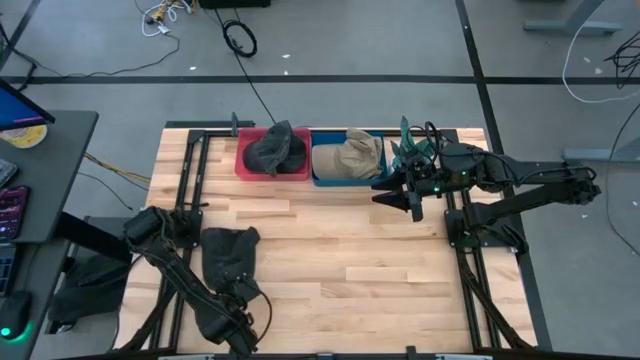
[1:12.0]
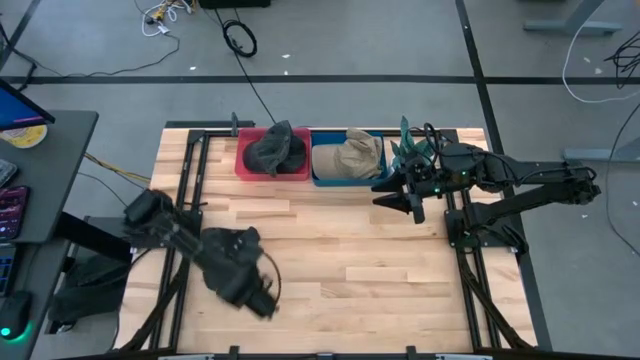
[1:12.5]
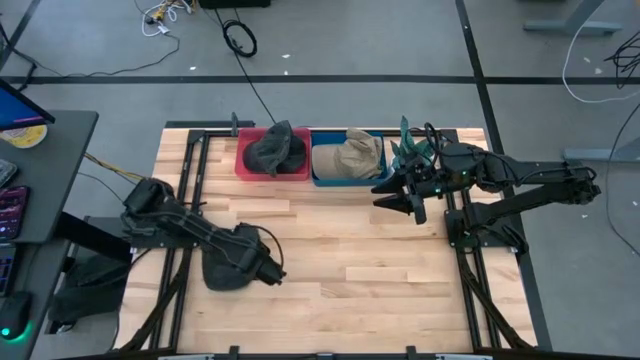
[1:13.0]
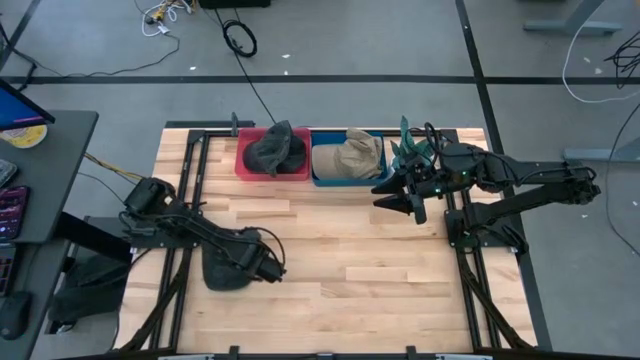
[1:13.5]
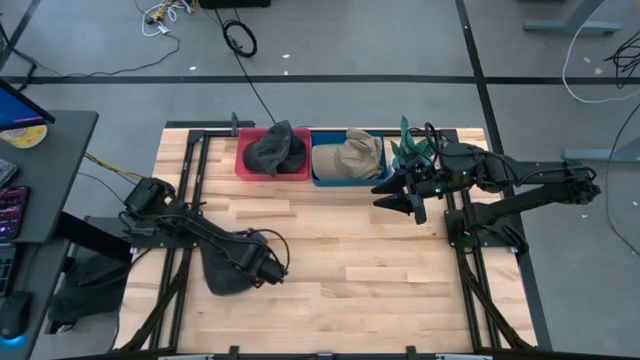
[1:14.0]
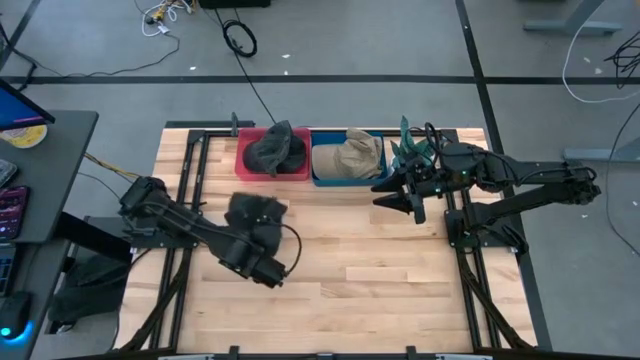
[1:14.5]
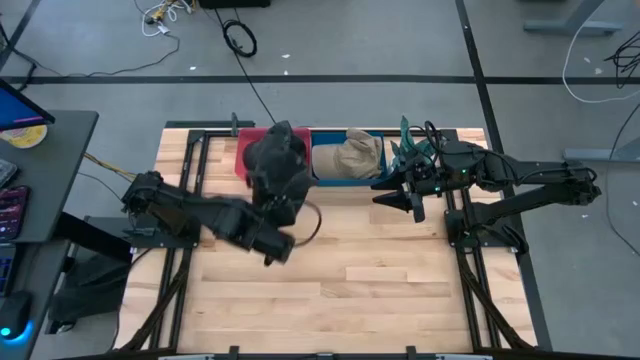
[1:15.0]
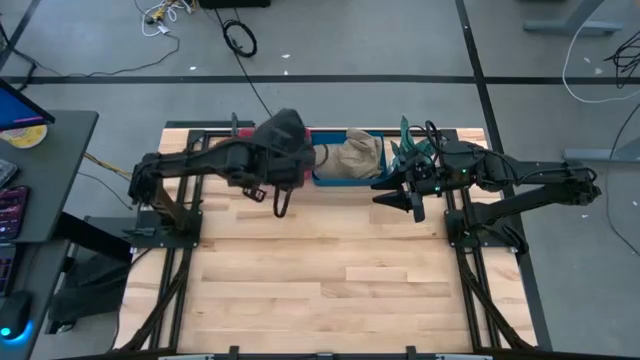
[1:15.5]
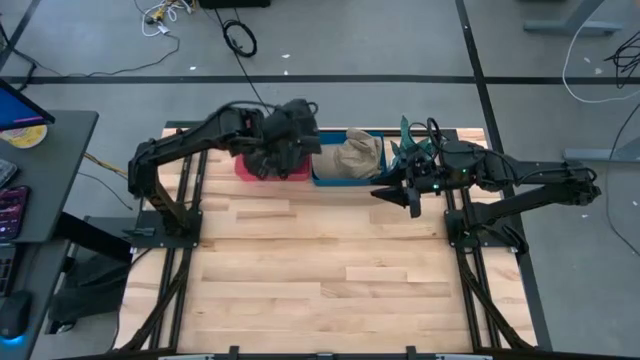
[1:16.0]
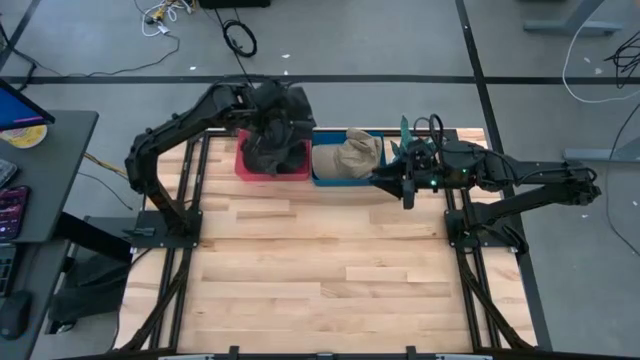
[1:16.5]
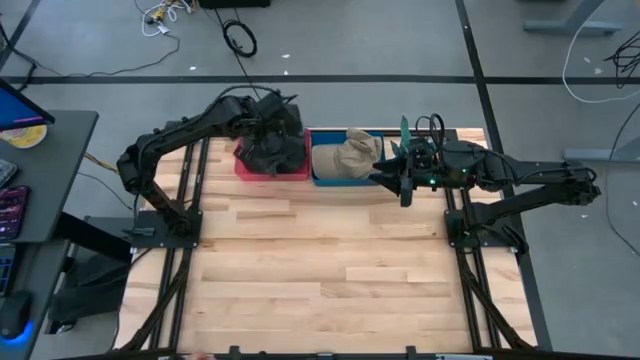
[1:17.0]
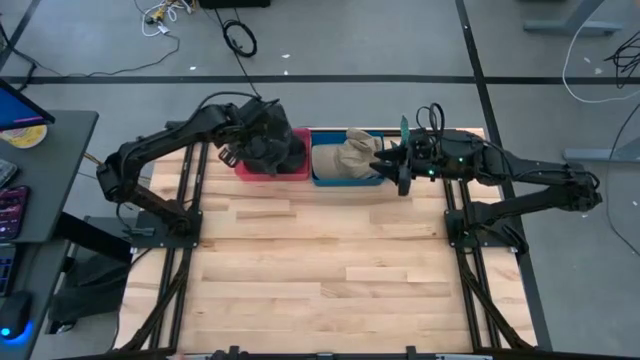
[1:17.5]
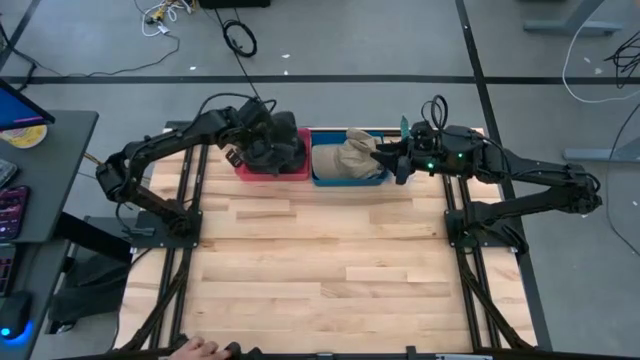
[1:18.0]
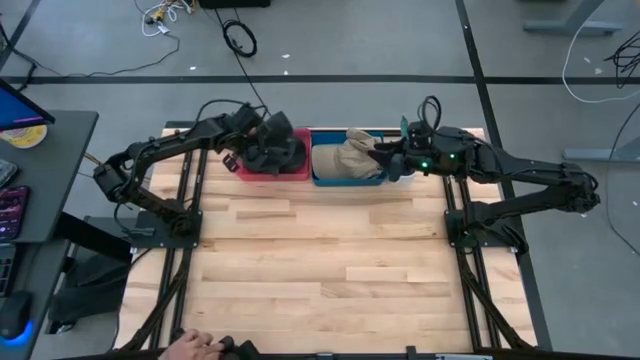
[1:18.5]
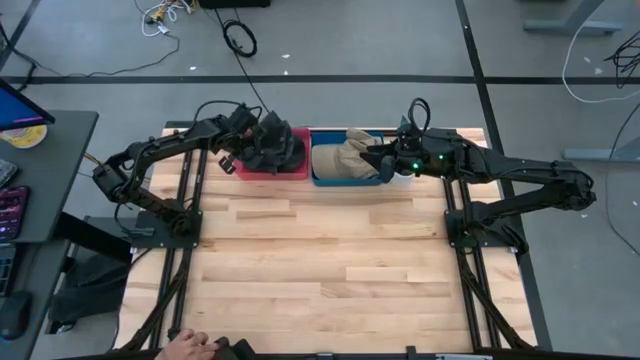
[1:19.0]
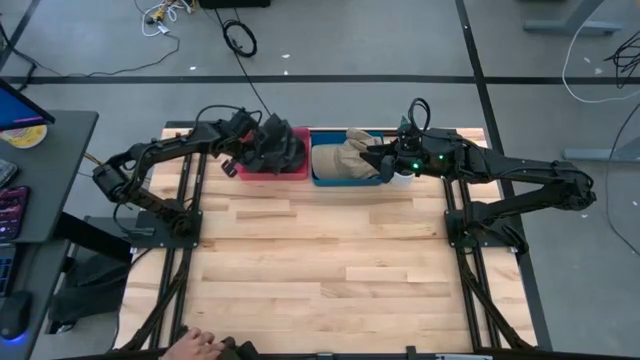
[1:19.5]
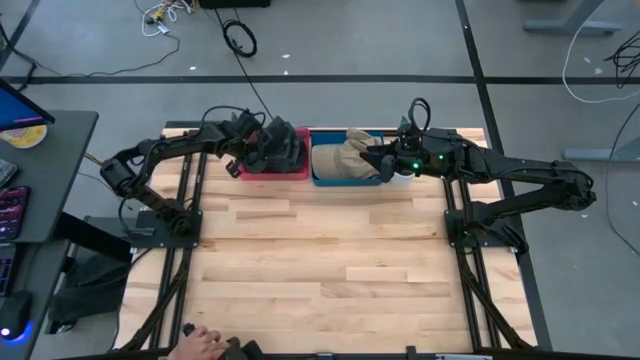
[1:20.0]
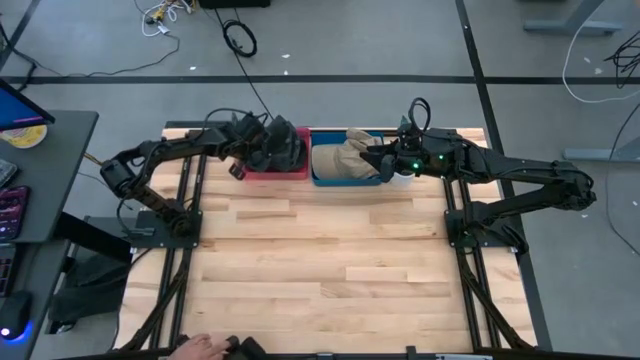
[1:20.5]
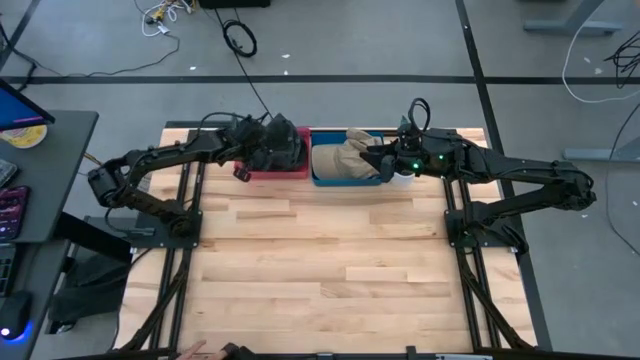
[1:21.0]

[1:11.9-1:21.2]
Task: Pick & Place hat
Put the black cap into the red bin

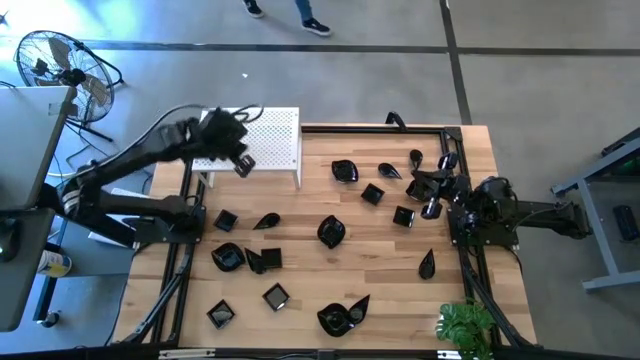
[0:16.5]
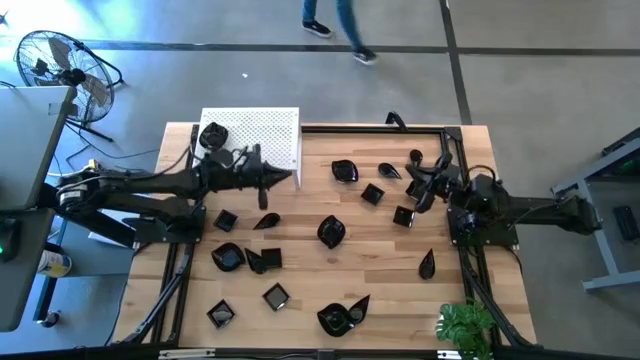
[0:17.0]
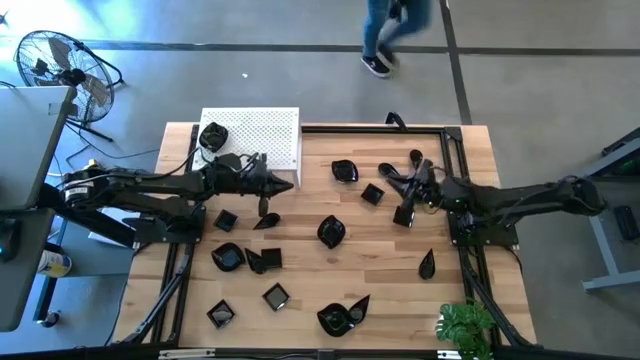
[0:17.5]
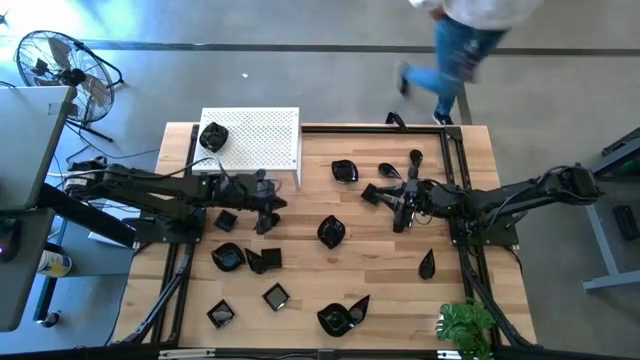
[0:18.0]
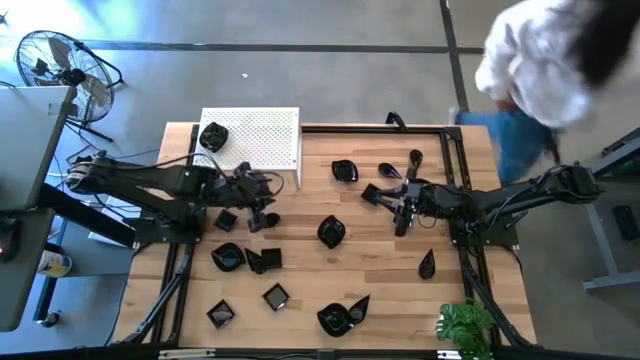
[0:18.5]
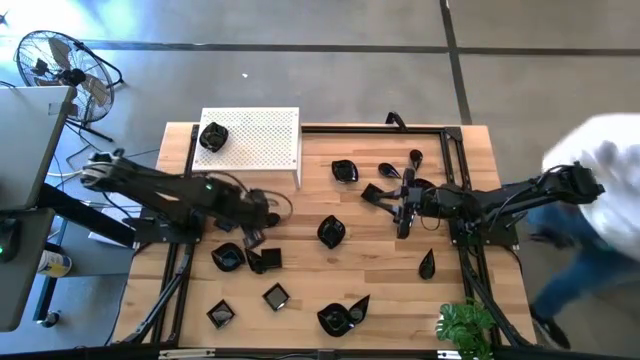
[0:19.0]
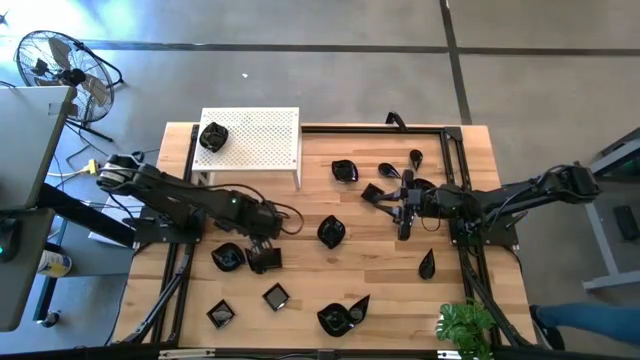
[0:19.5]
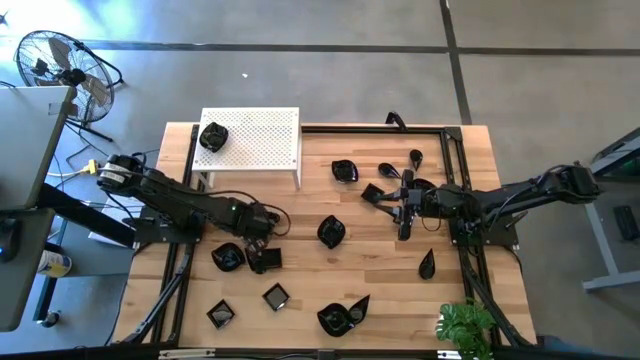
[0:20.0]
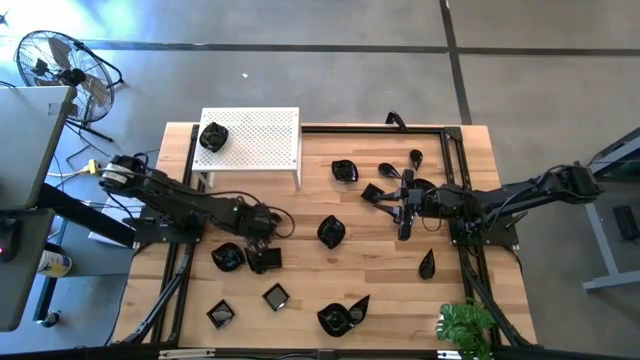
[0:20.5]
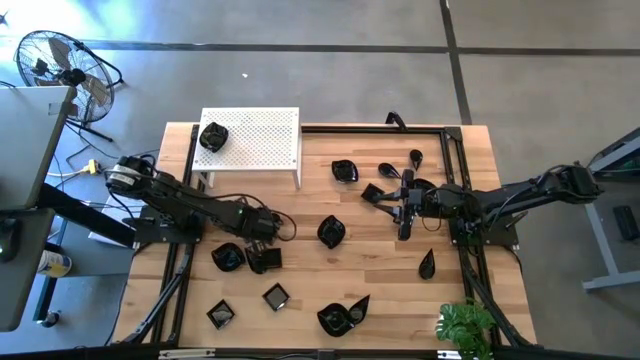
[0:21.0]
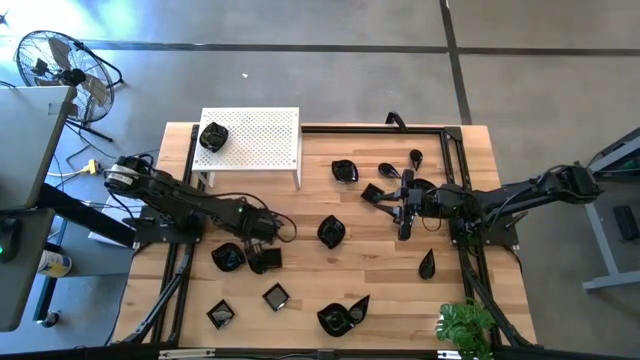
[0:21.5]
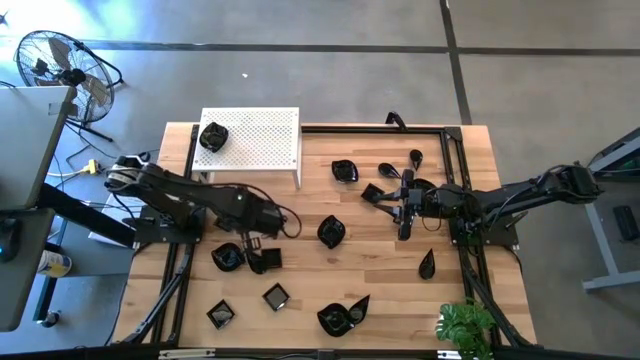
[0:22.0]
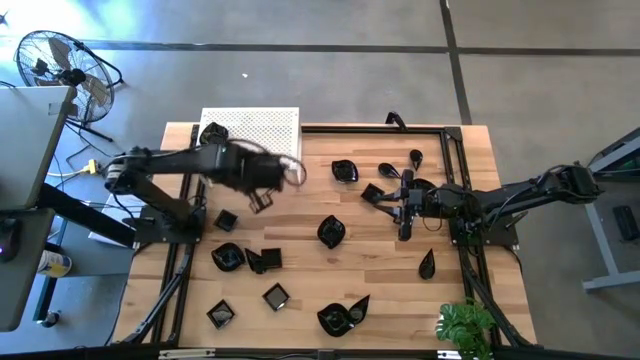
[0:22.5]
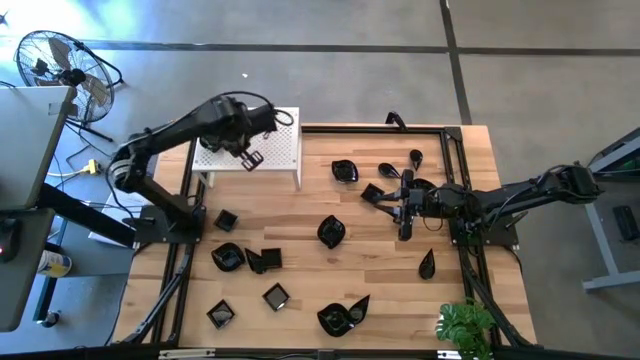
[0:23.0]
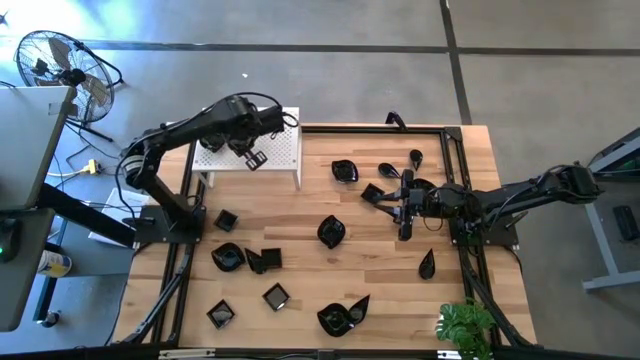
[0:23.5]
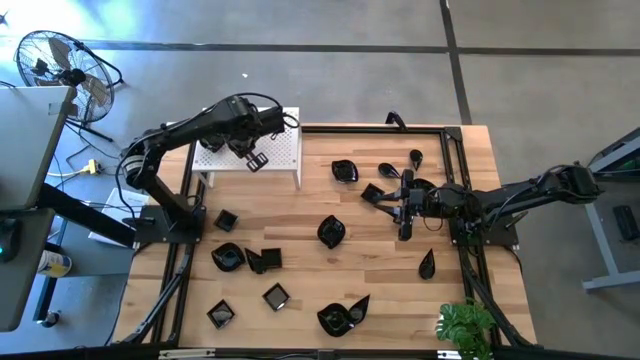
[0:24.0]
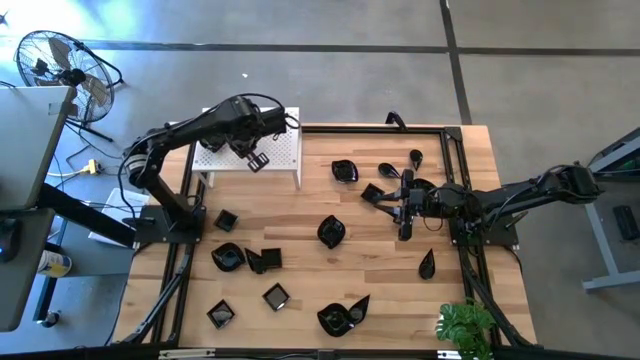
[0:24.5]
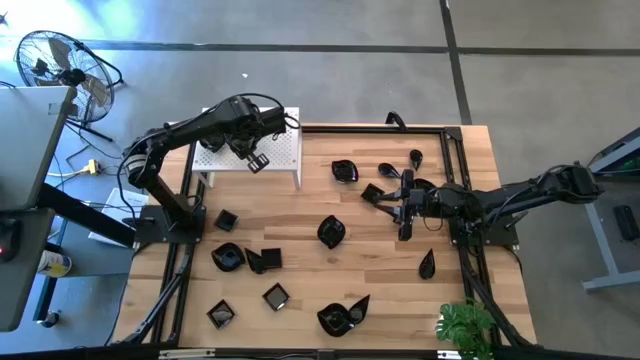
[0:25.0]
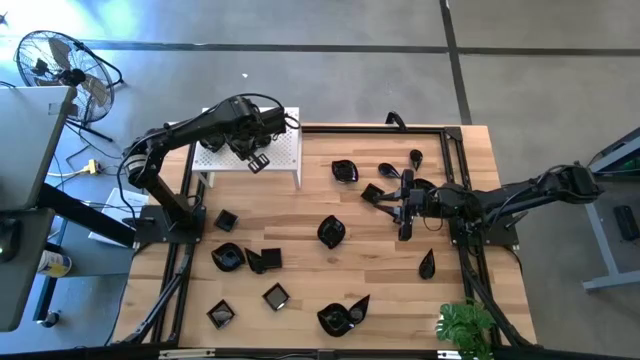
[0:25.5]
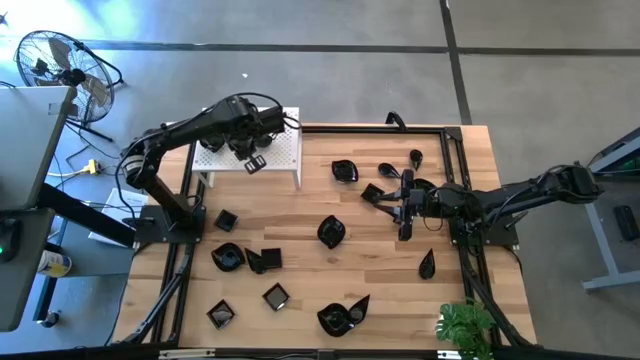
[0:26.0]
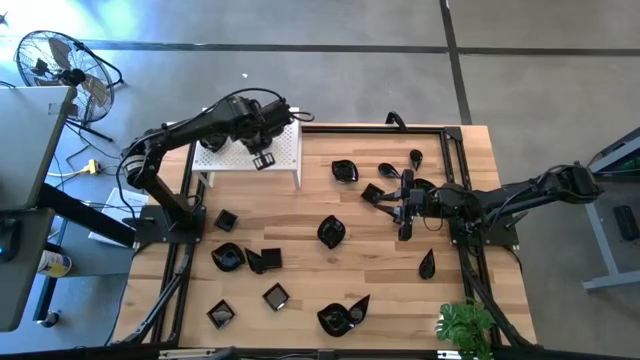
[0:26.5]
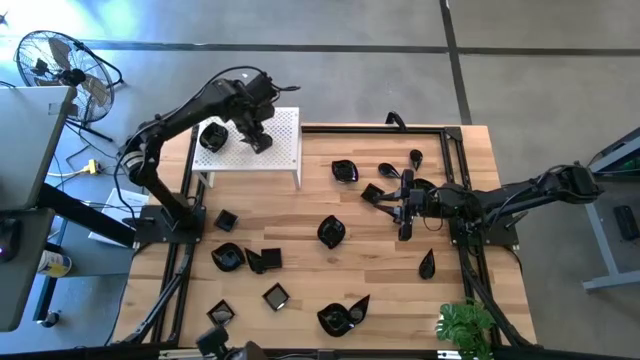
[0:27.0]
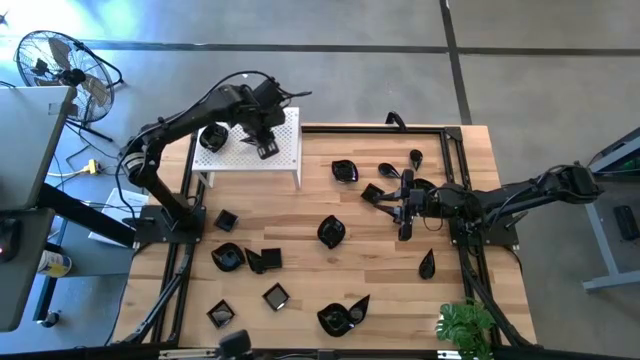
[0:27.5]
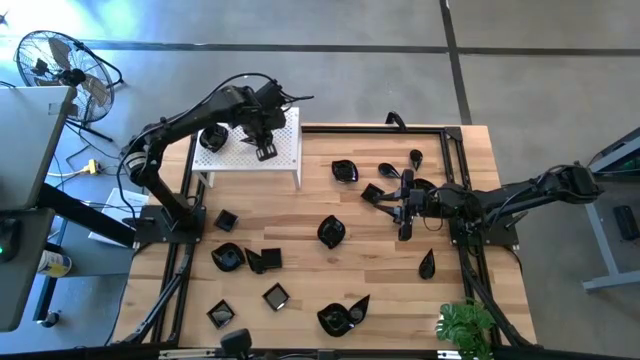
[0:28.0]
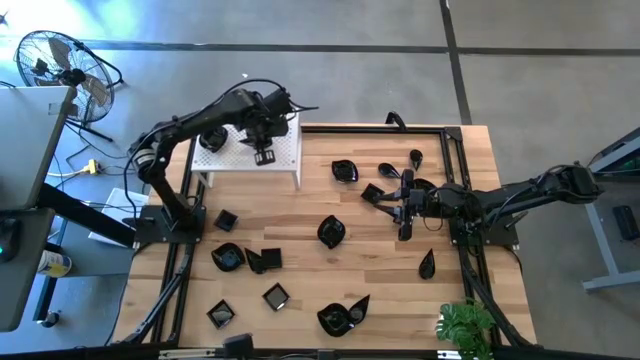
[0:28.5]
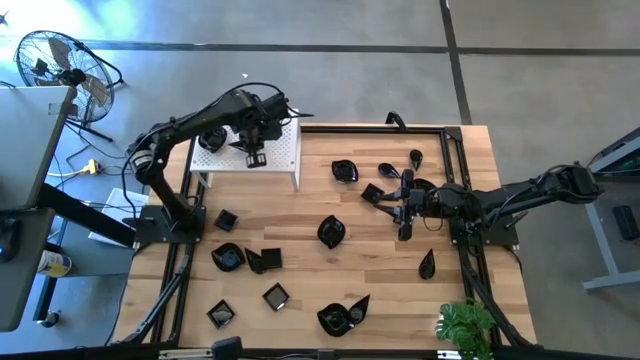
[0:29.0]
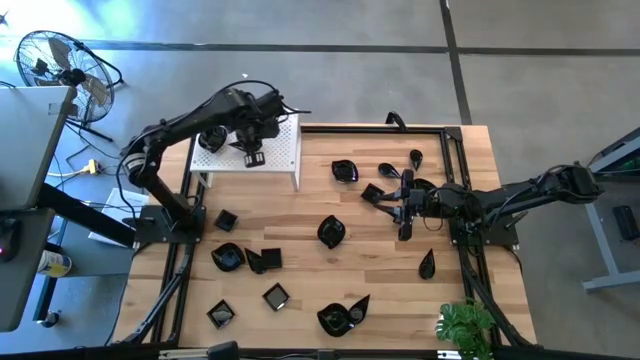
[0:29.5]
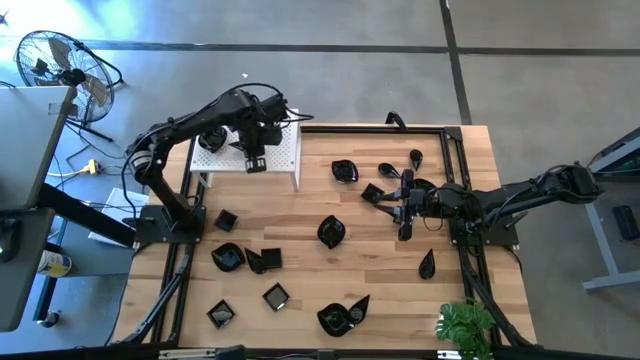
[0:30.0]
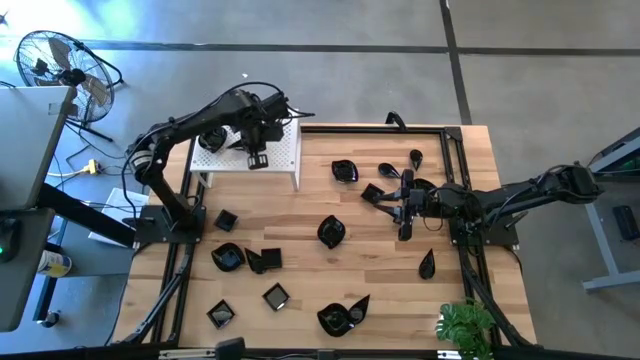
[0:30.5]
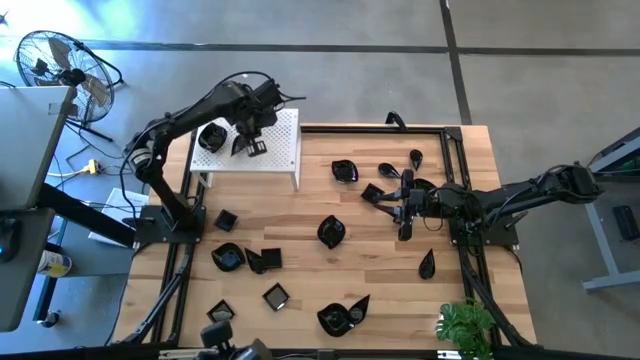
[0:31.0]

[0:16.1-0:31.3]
Task: Pick & Place Mini shaped plates
Put the black drop shaped plate on the shelf
